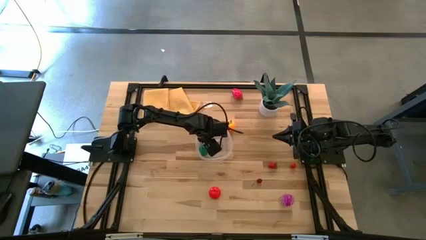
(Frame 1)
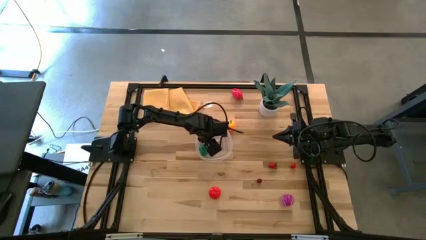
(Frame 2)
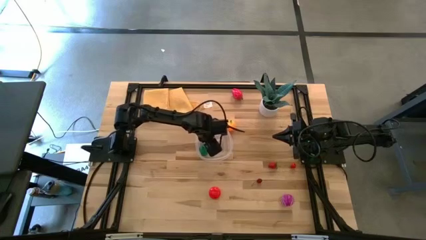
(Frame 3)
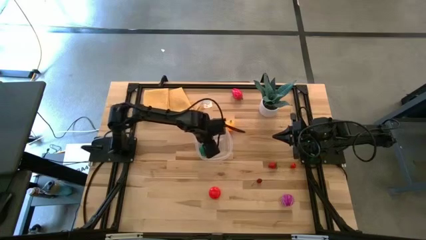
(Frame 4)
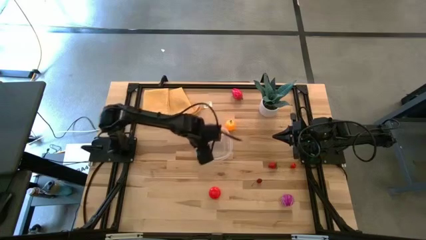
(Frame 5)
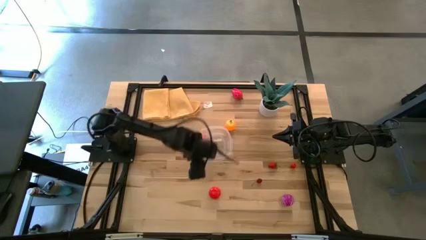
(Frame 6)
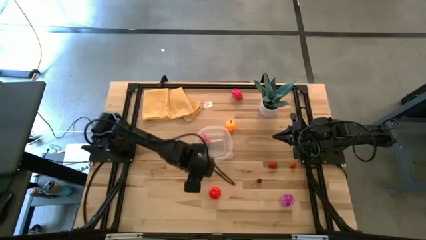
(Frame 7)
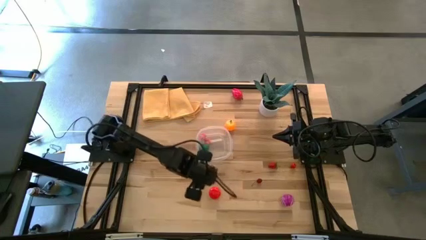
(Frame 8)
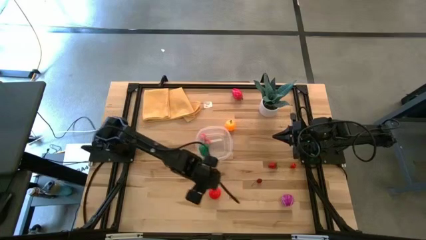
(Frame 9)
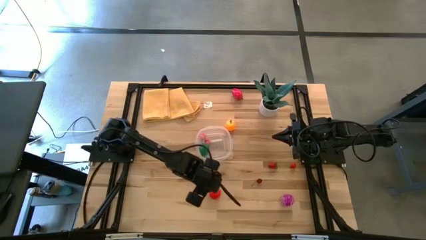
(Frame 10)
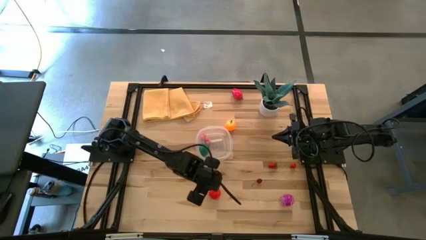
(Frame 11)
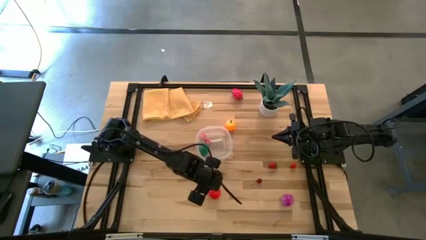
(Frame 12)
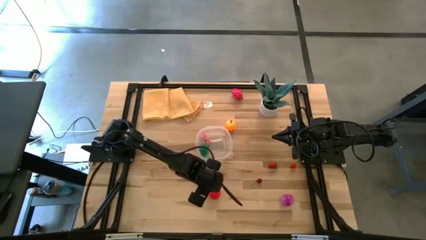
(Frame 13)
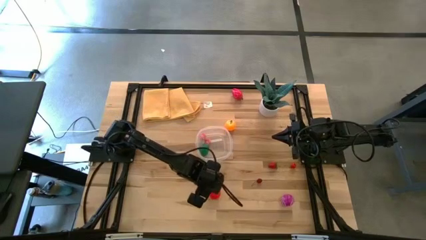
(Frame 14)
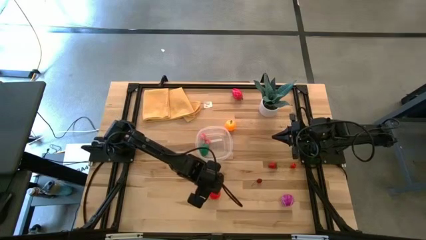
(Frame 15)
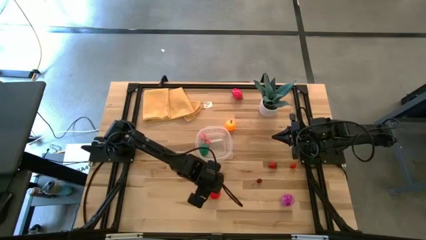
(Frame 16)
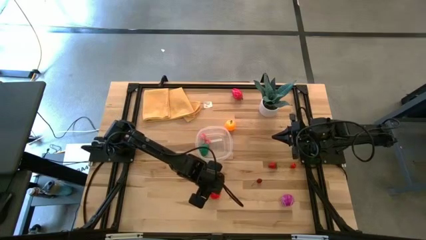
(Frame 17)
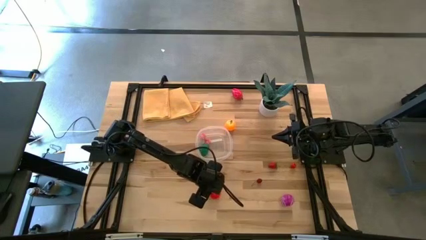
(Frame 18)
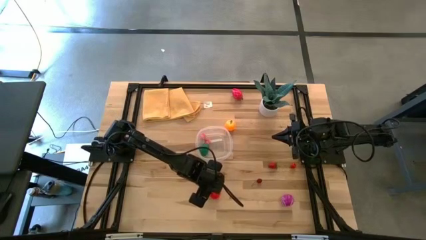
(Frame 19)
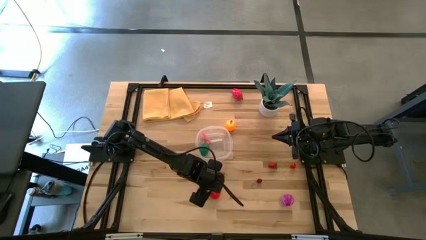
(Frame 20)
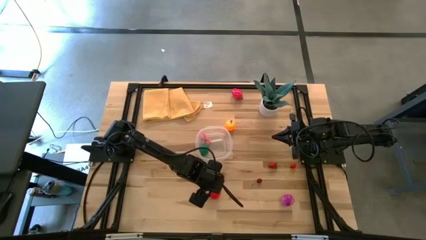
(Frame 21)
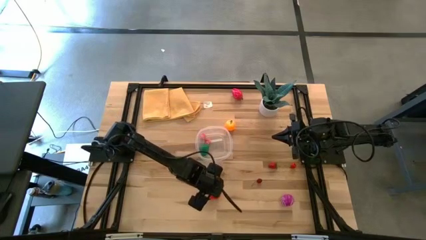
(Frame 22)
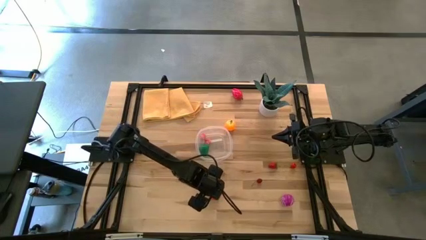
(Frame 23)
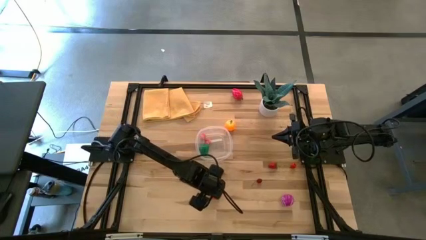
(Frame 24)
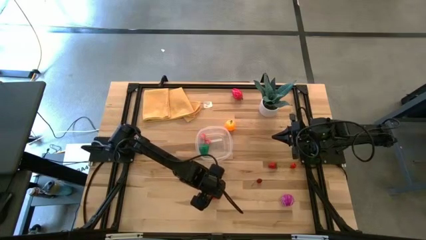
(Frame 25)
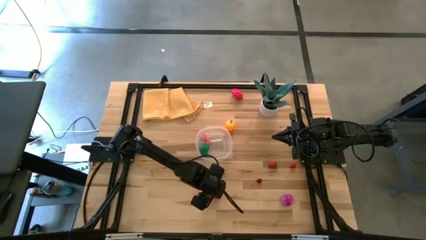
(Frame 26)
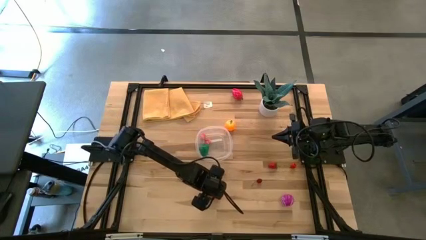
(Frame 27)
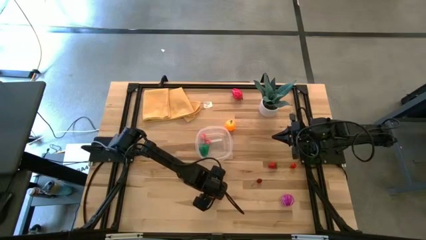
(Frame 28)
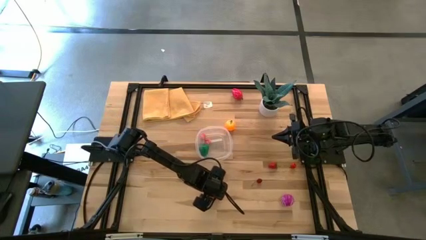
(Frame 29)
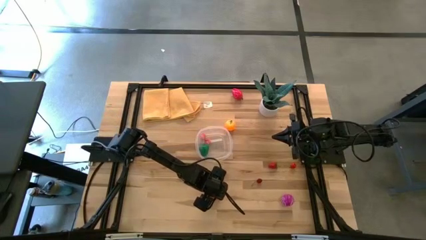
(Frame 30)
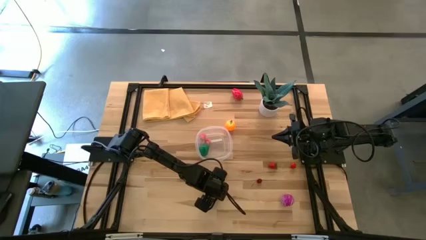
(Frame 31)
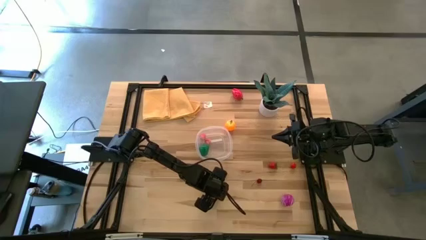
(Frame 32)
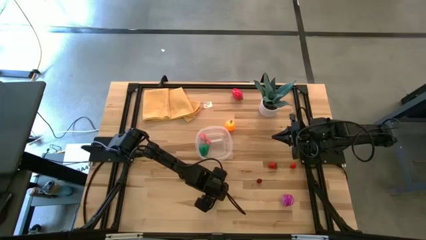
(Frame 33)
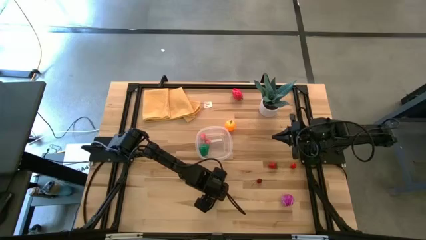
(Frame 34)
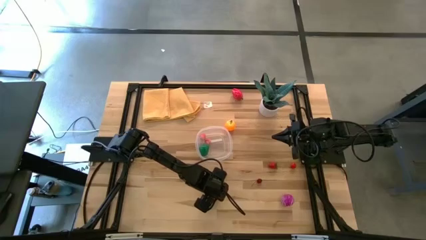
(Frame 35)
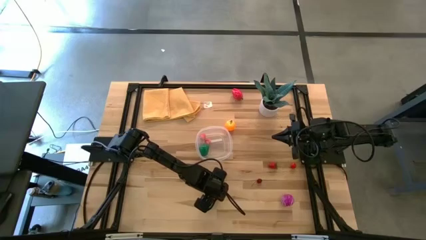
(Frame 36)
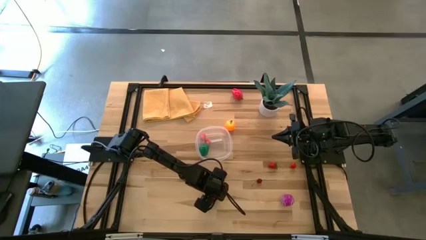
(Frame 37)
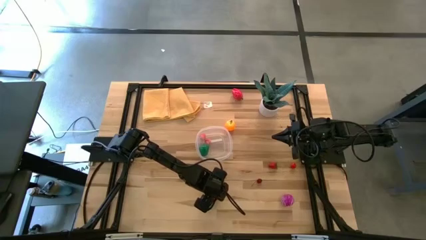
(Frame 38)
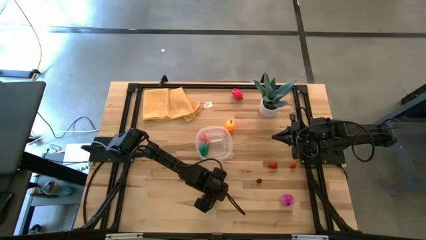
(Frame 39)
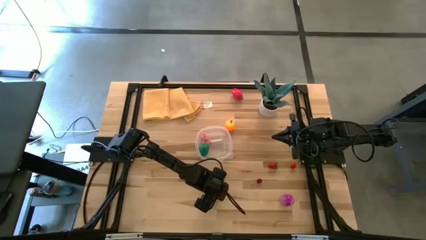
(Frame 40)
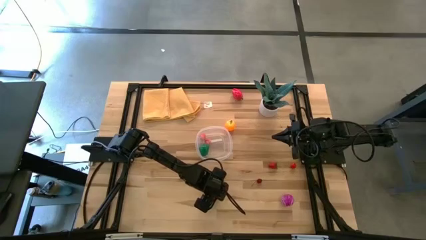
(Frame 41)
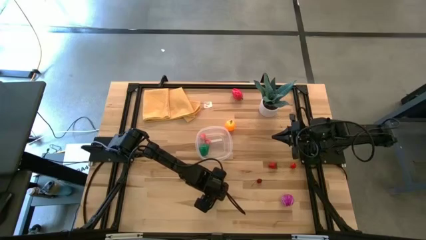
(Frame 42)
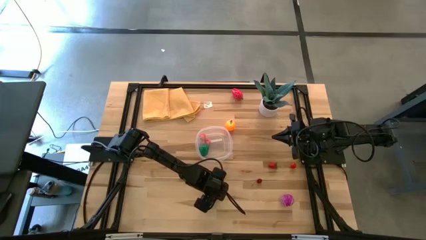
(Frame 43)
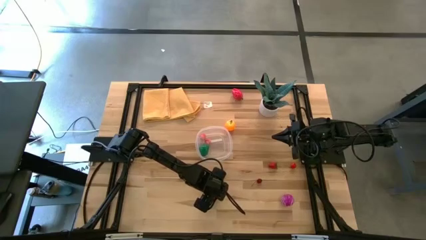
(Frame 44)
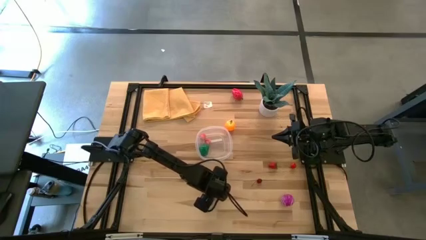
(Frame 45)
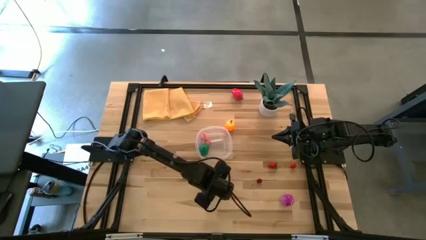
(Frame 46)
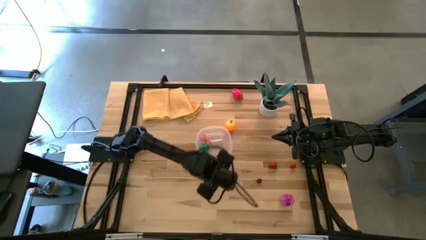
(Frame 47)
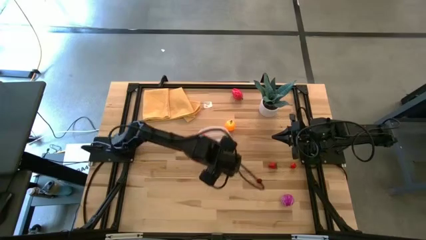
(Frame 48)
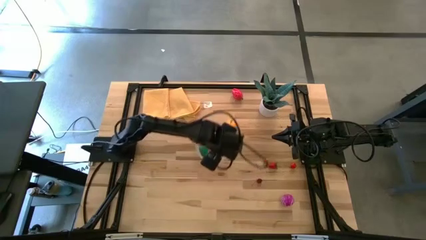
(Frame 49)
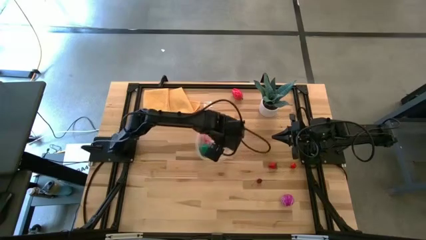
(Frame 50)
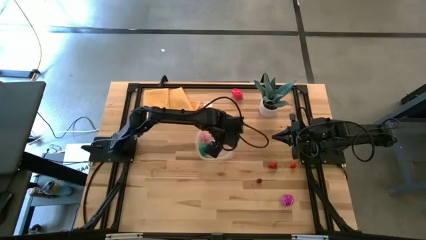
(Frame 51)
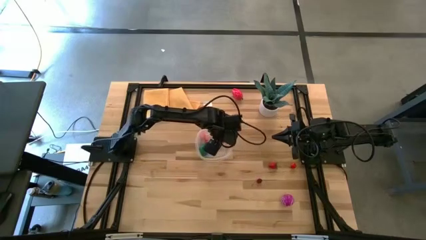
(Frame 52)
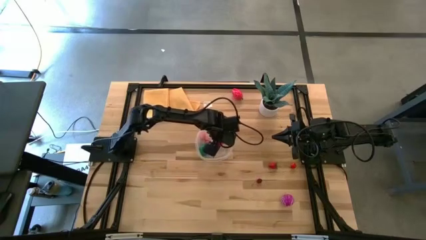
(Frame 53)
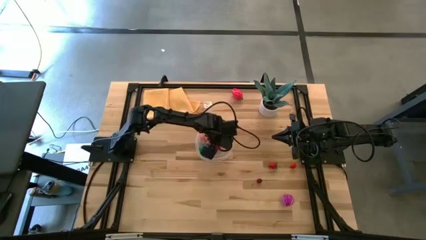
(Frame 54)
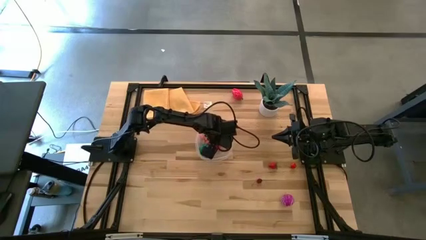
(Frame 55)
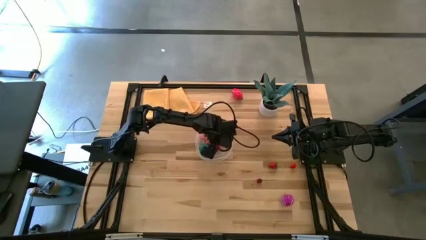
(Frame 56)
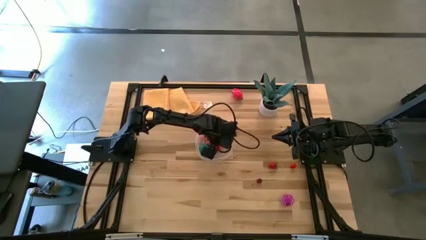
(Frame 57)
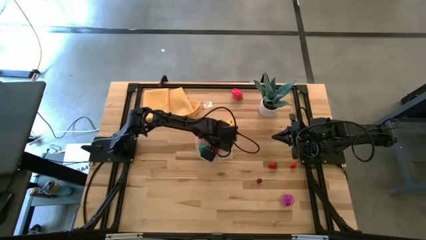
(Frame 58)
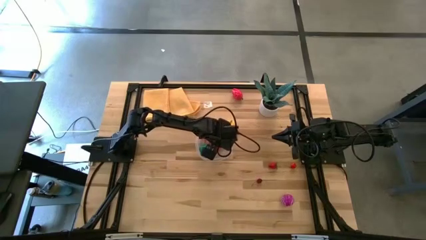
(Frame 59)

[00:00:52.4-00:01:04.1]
Task: Pick and placing Produce into tupperware
Put the orange tomato into the transparent bin
